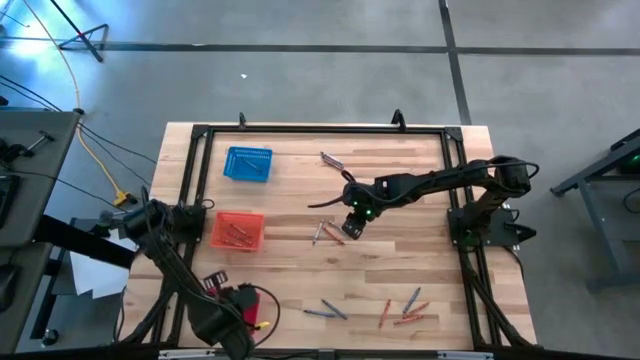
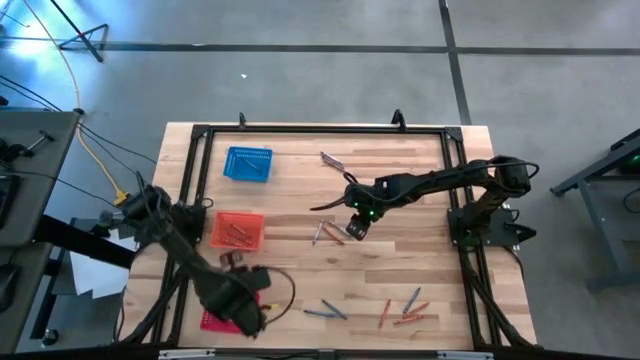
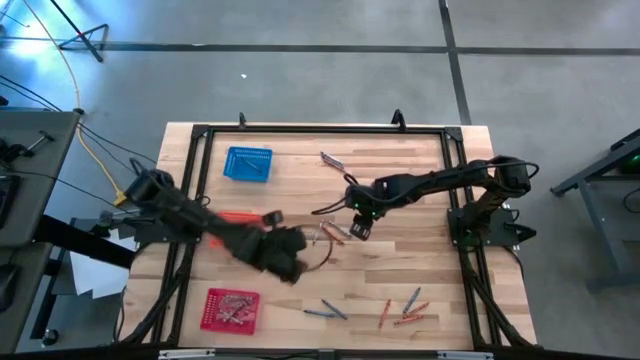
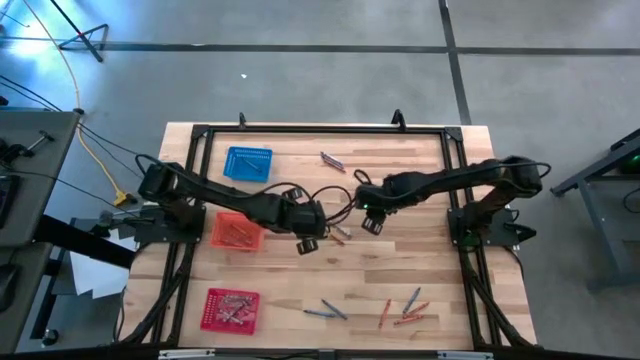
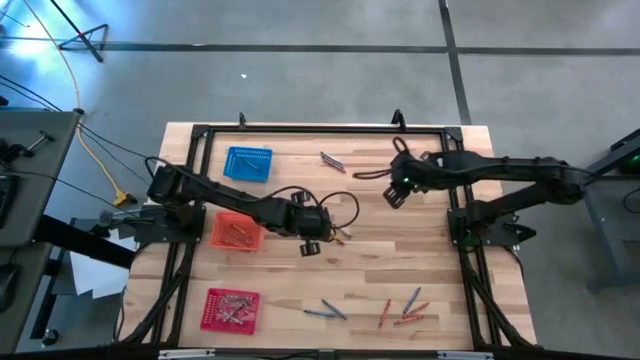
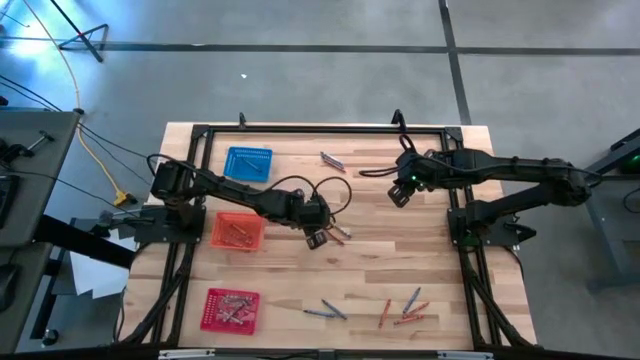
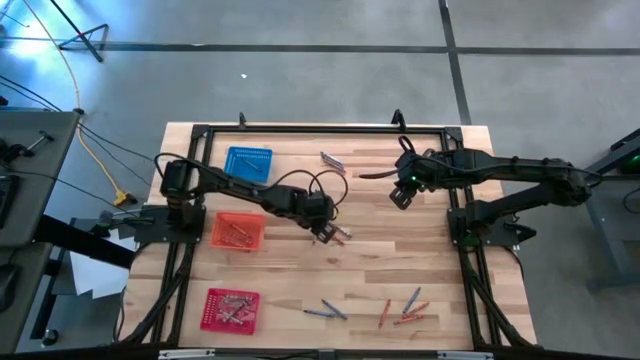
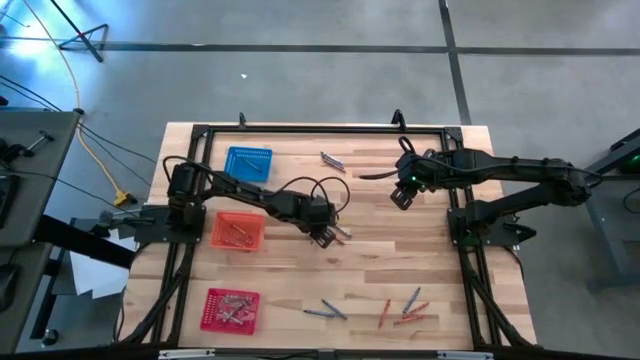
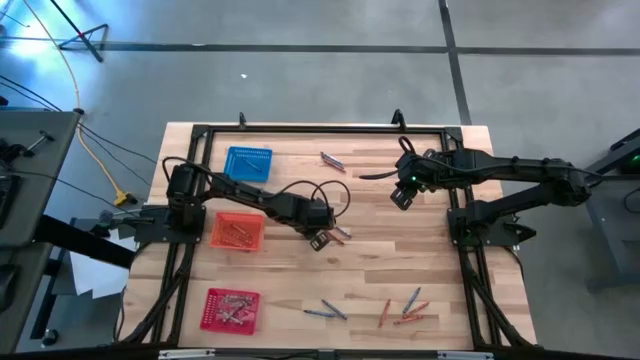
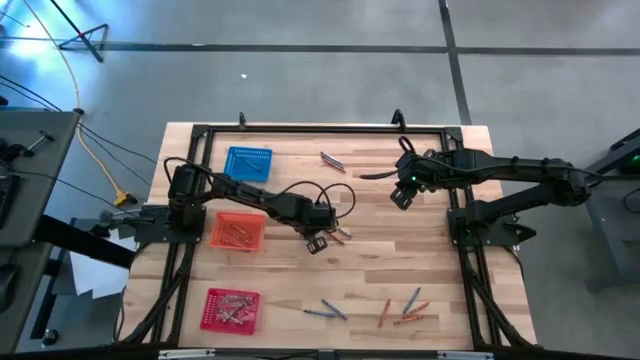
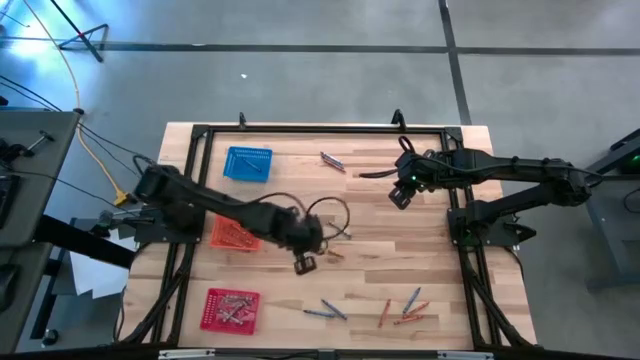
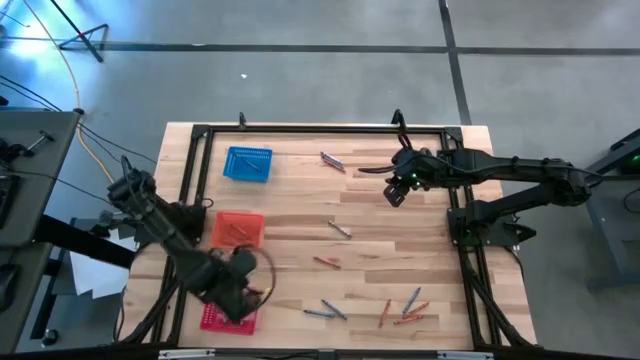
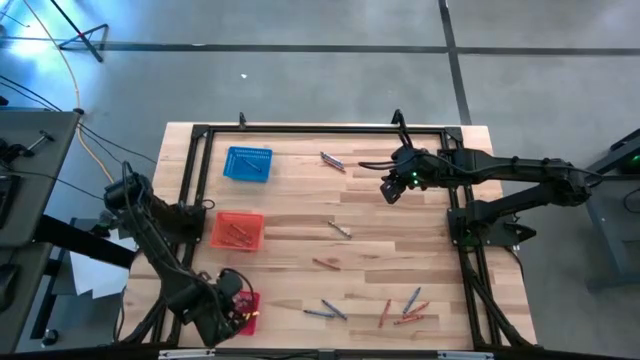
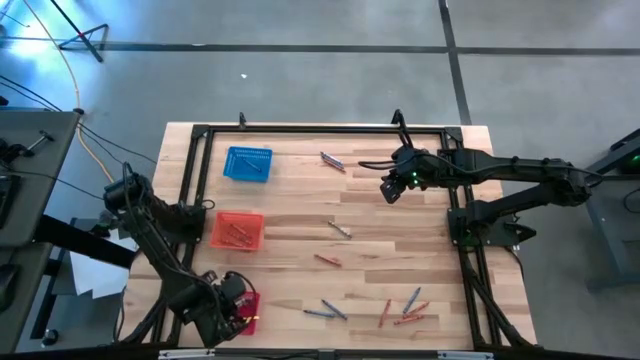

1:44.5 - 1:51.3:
Task: Sort crayons
Put the gray crayon into the red bin

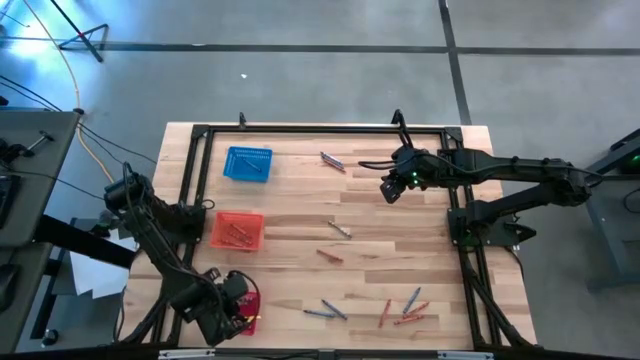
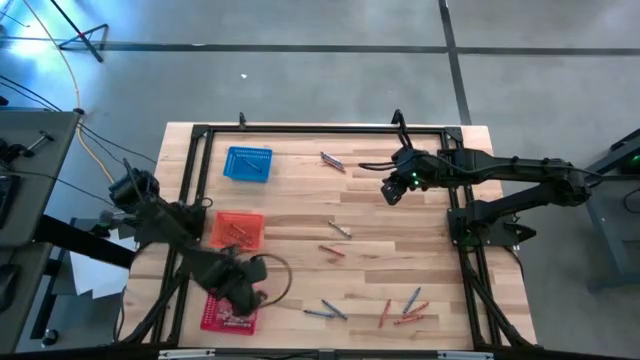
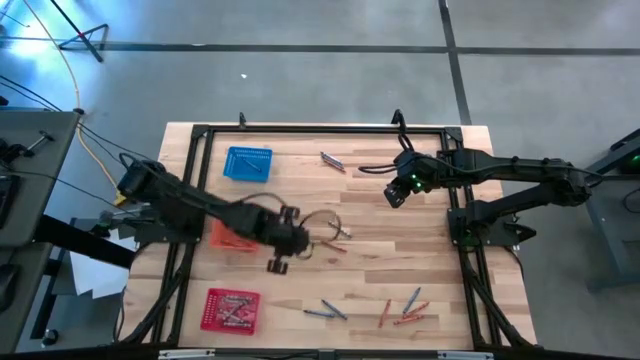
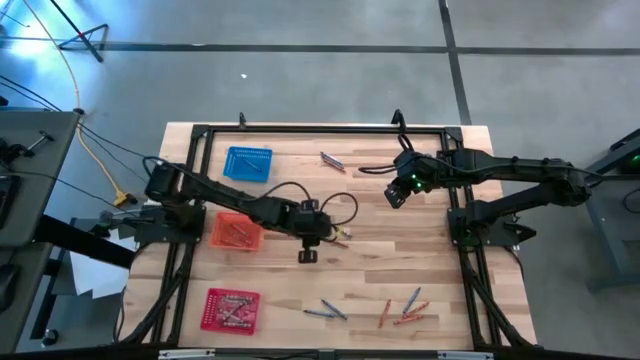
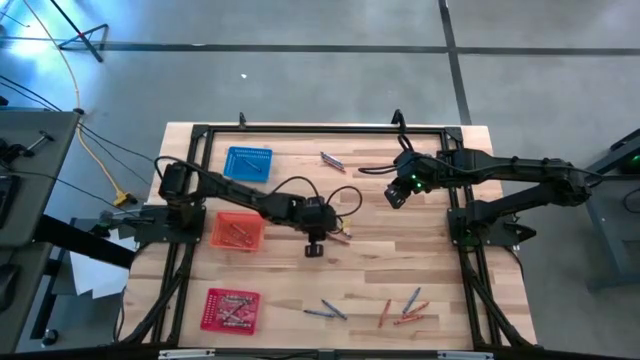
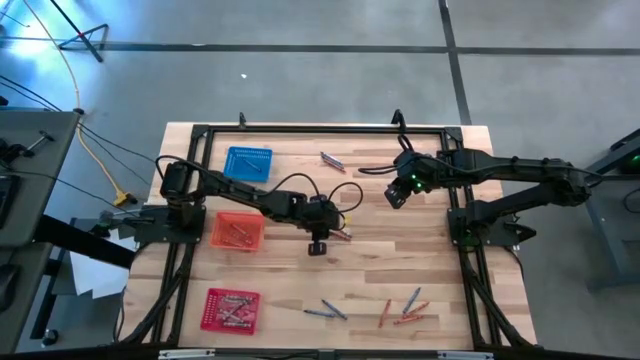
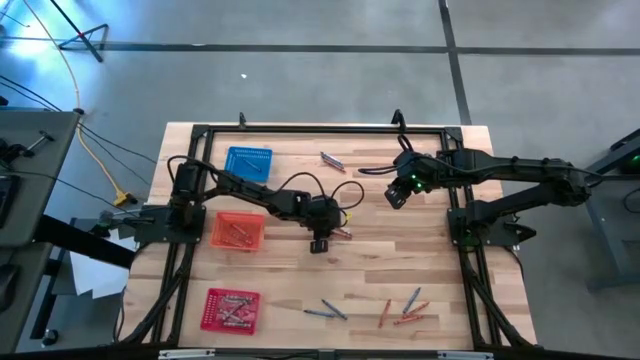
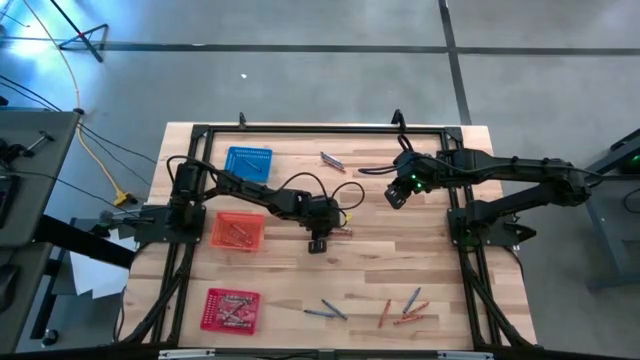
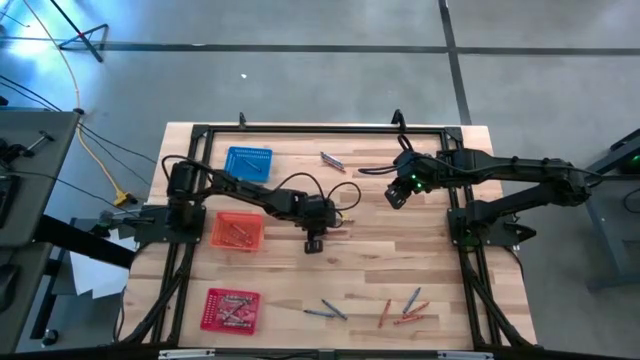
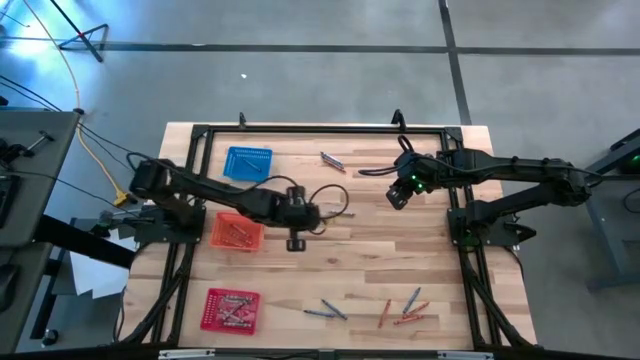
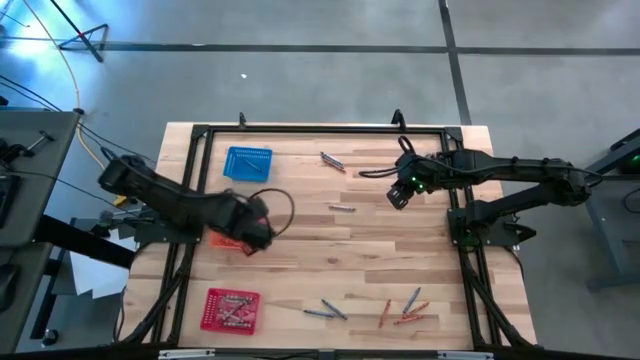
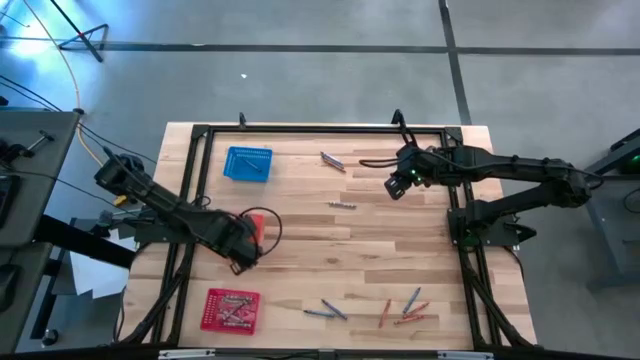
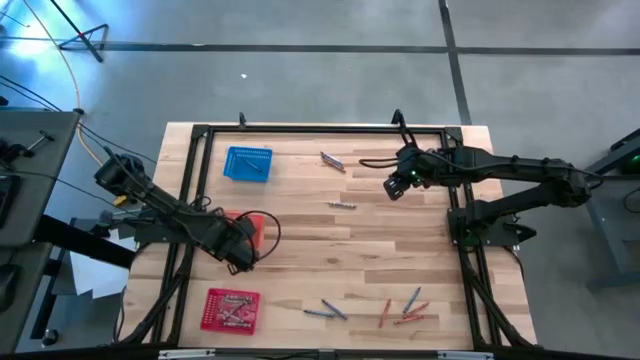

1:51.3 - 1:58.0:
Put the orange crayon into the orange bin

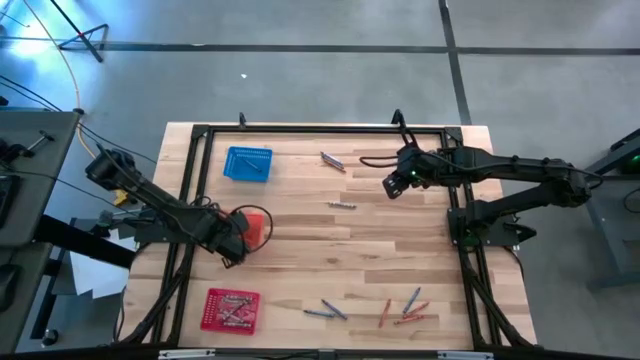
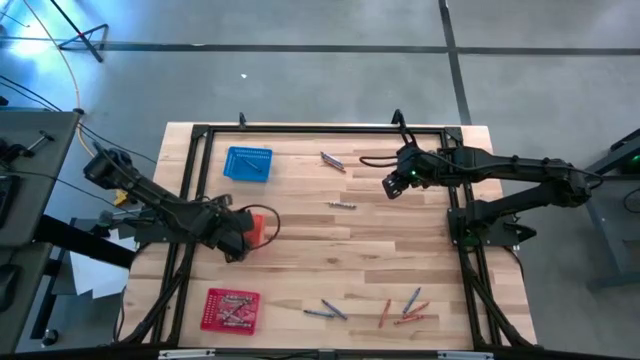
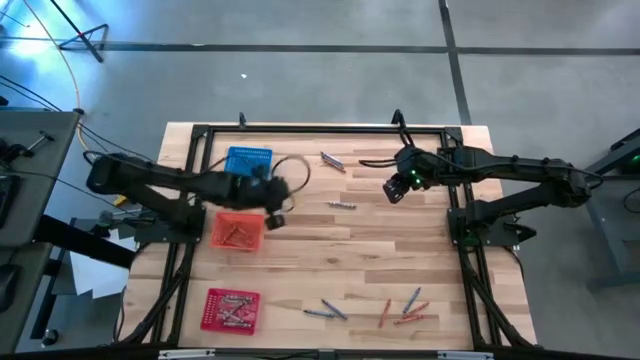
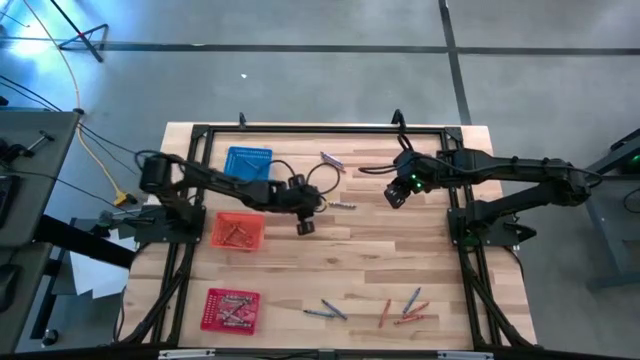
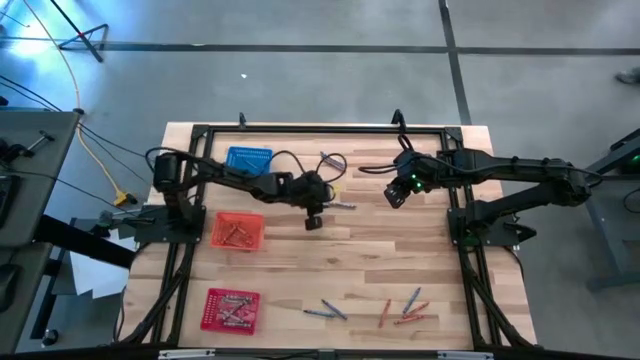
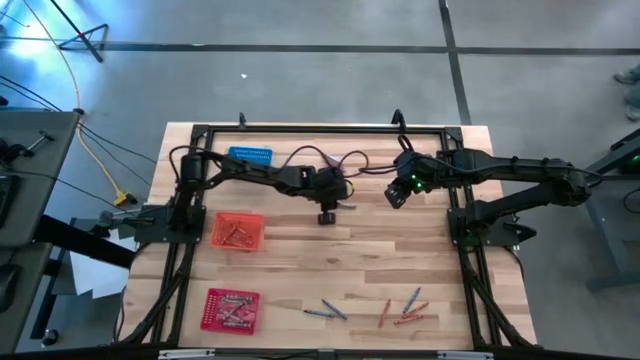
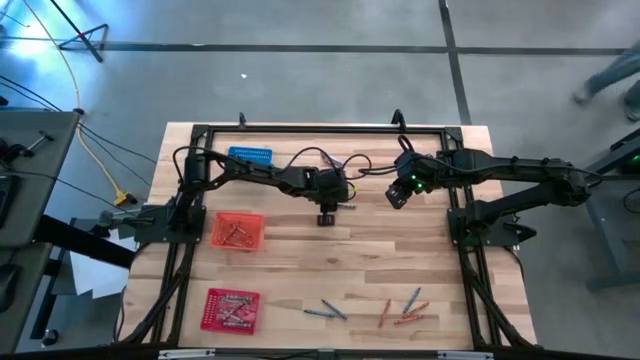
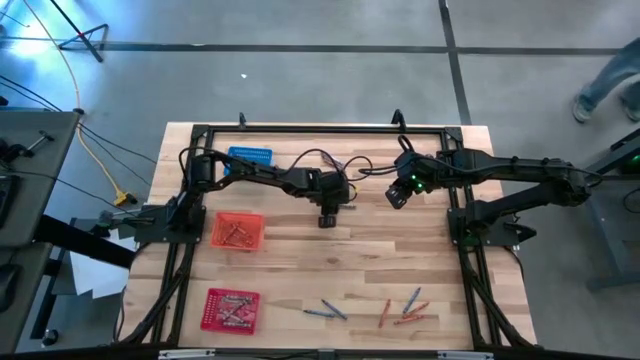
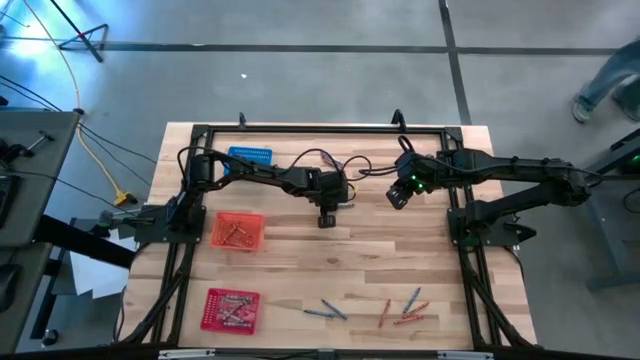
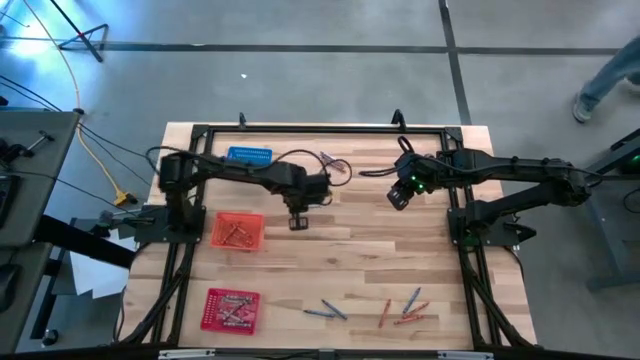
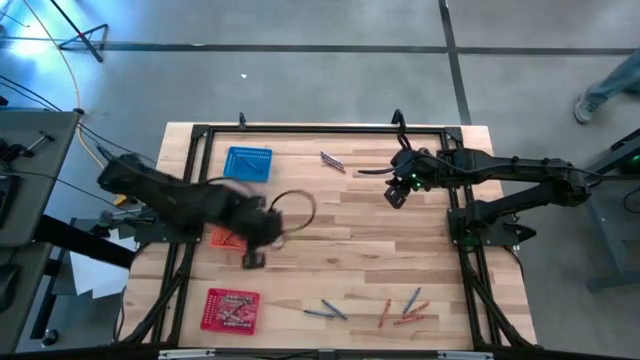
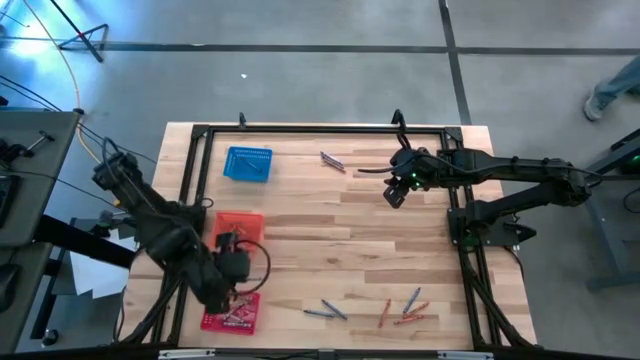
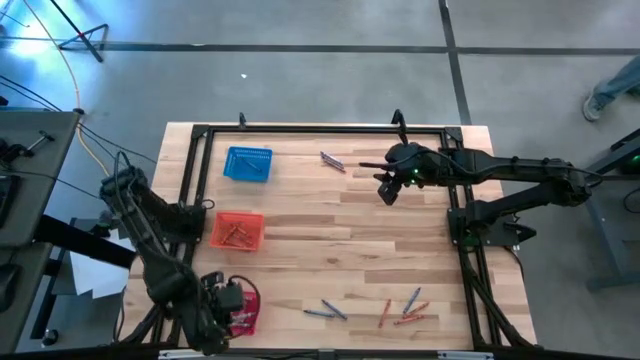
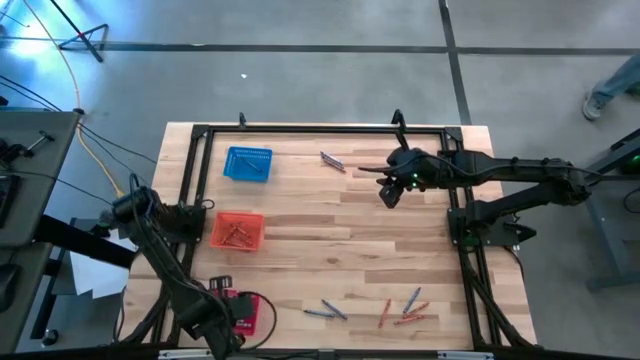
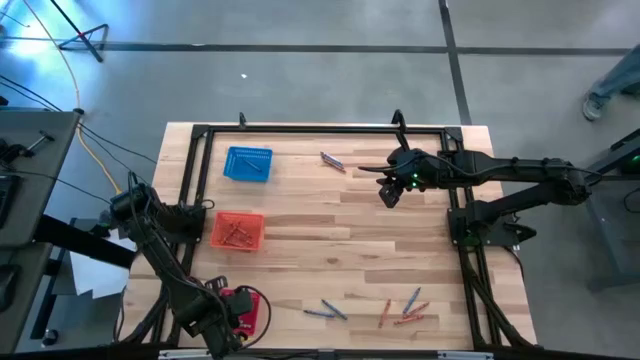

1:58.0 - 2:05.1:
Put the gray crayon into the red bin
